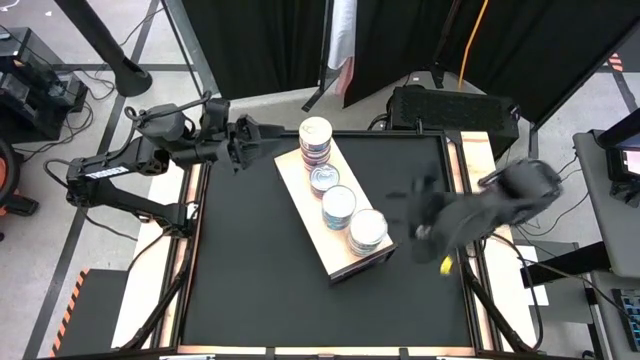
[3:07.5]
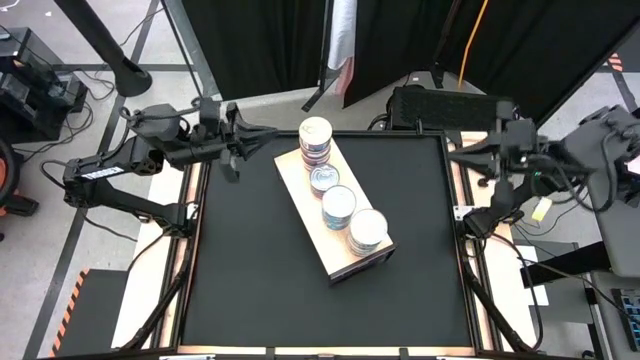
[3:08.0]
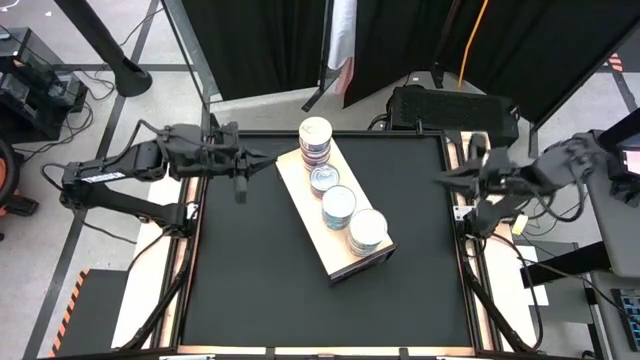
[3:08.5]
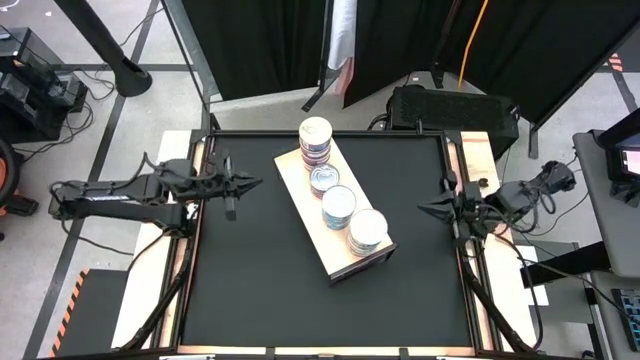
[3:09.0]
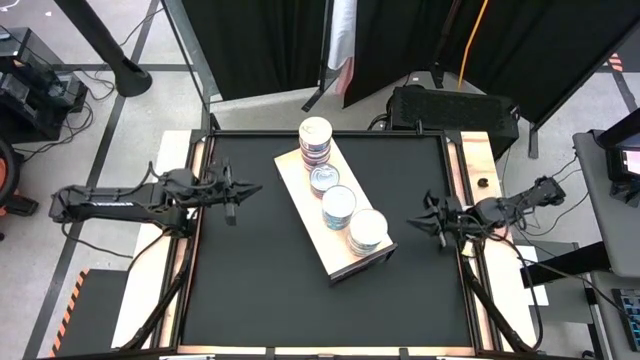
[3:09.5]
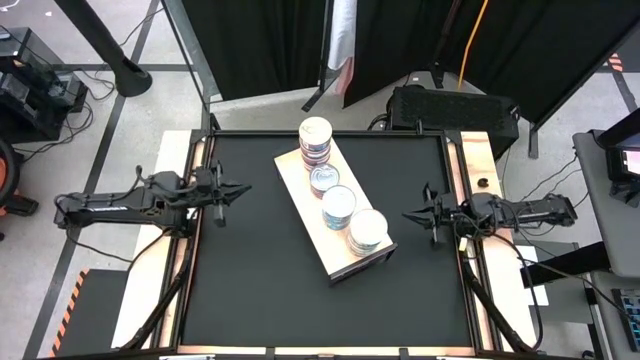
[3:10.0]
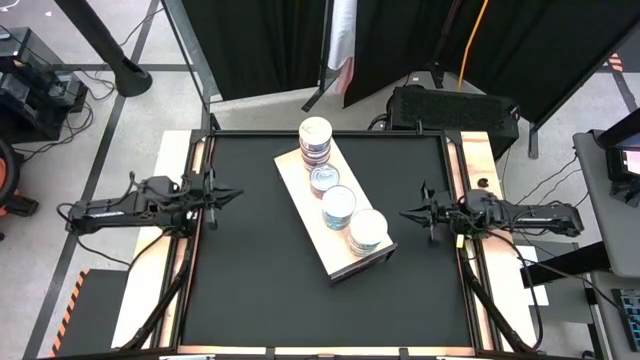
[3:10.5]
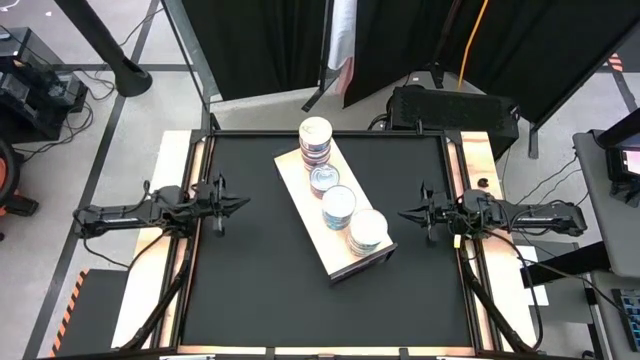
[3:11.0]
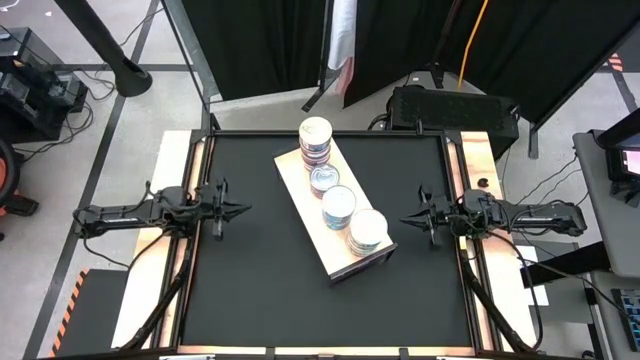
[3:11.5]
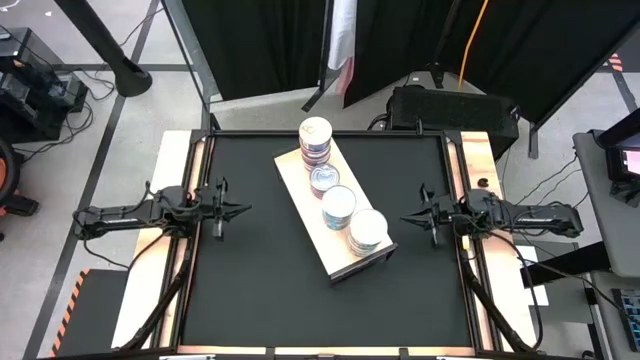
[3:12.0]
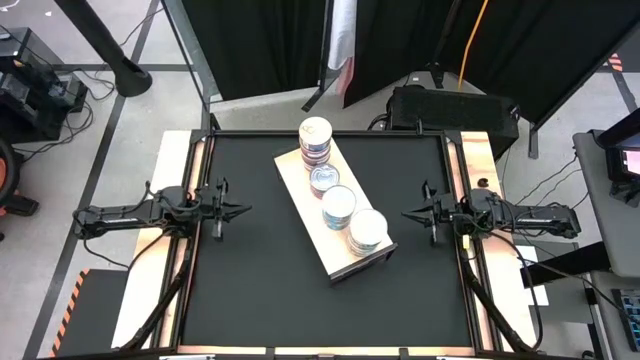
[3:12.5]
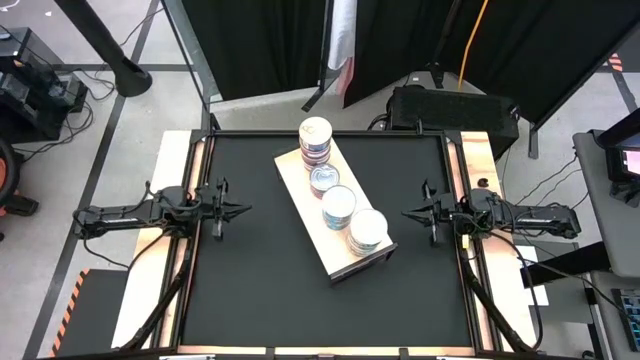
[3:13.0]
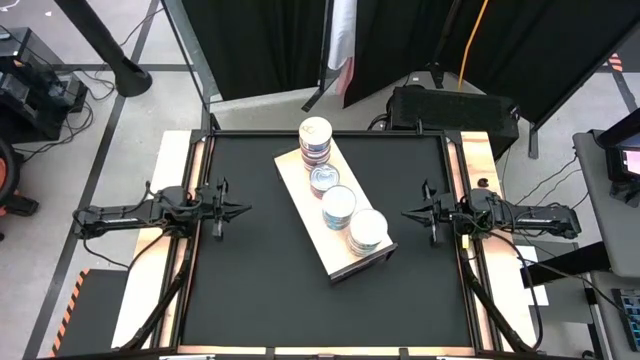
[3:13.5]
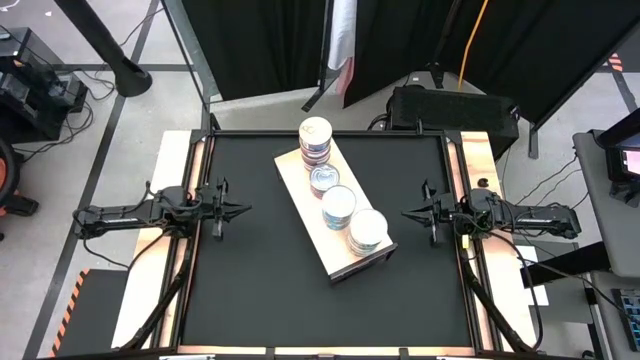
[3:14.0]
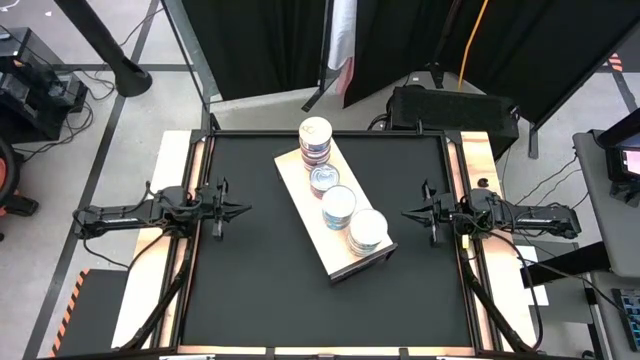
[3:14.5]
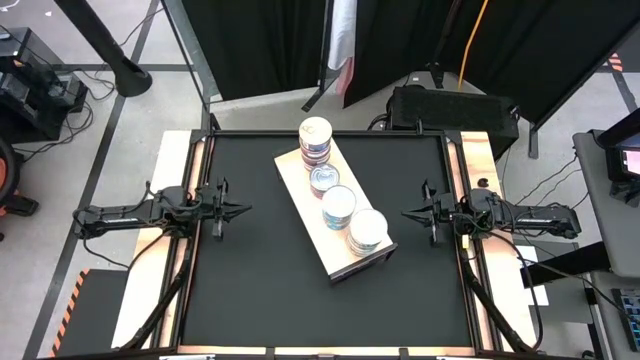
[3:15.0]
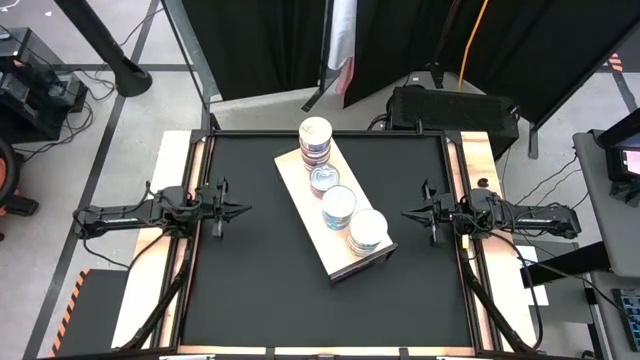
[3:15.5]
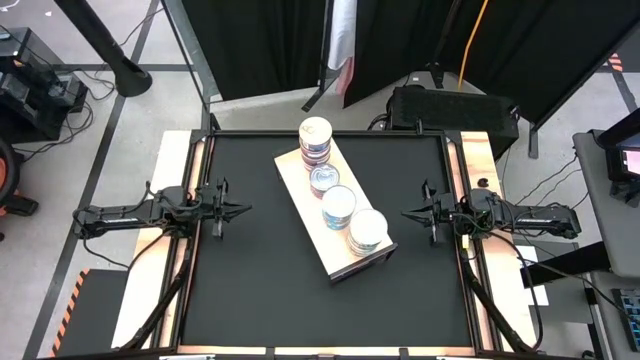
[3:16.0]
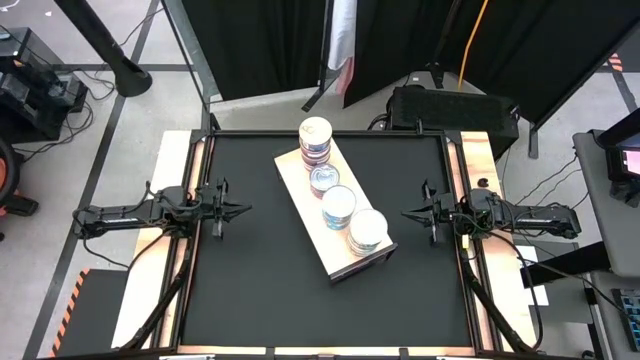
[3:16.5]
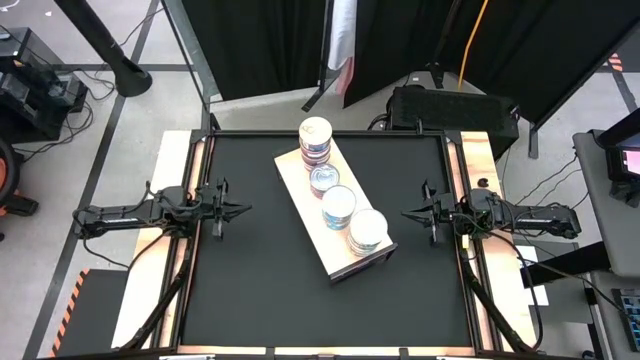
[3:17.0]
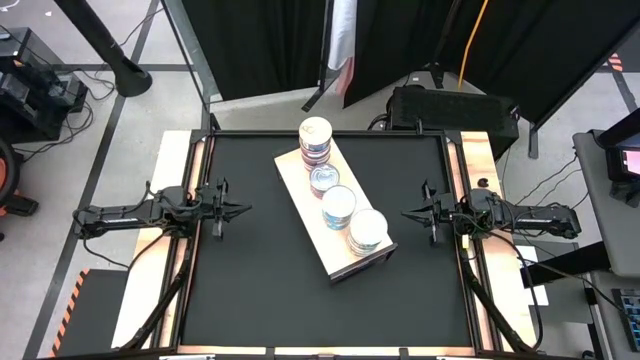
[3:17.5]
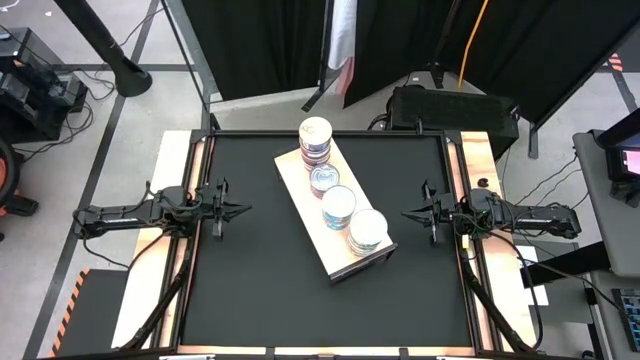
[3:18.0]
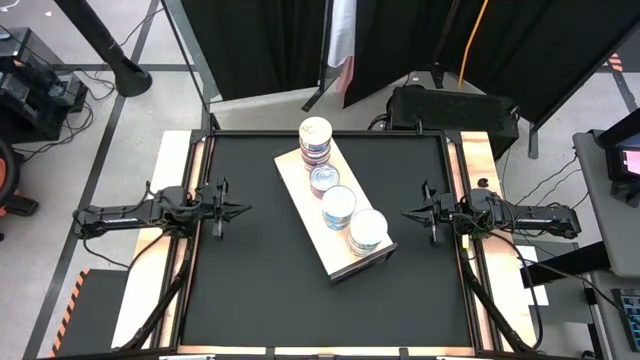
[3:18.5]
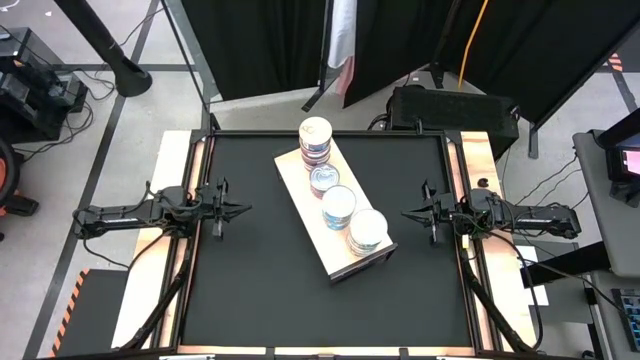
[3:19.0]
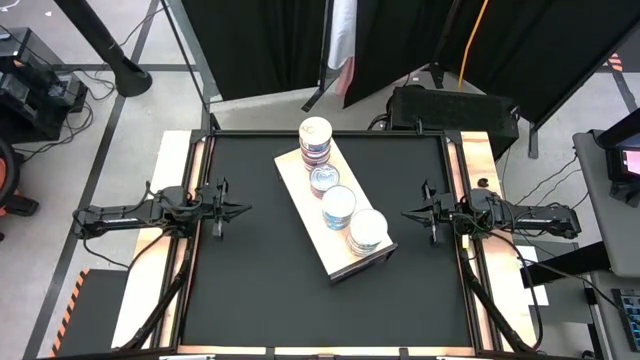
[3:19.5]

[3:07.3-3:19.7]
Task: Stack canned seafood by type on shelf
Return to Home Position

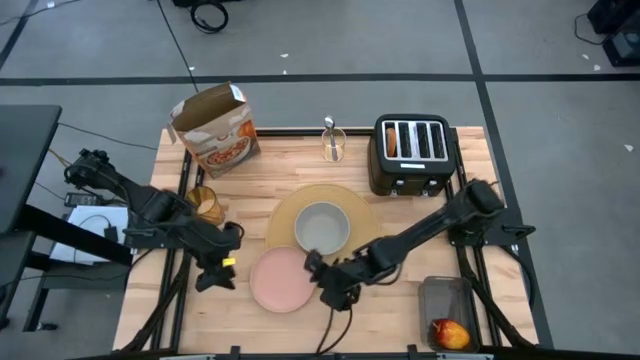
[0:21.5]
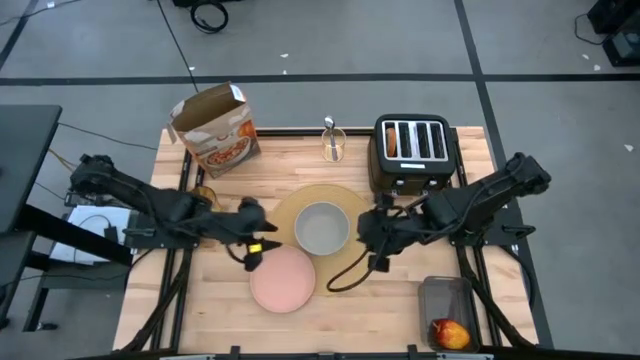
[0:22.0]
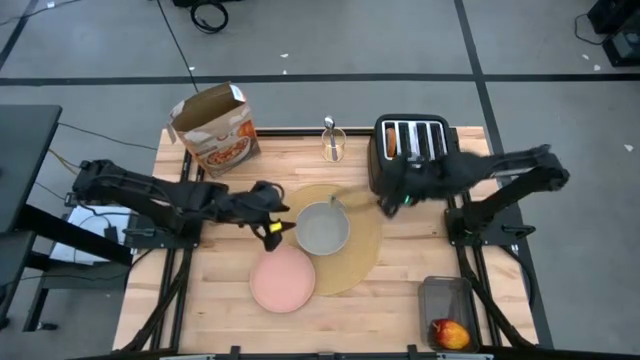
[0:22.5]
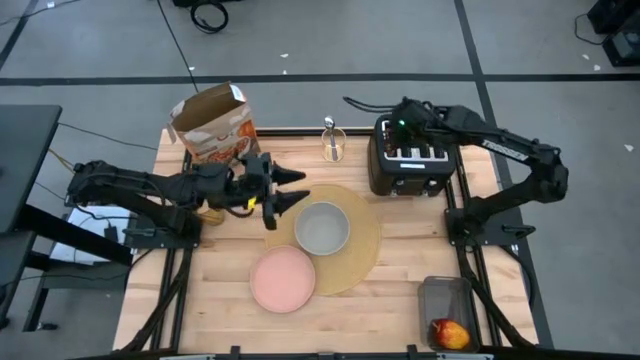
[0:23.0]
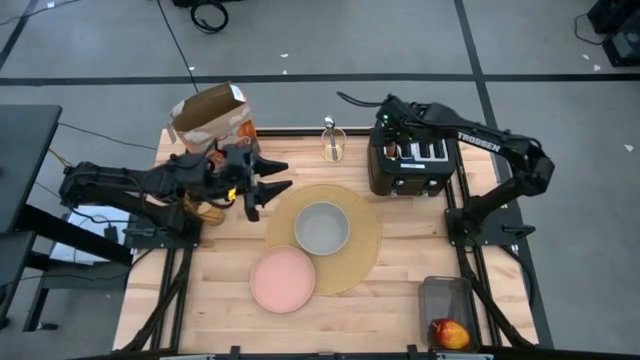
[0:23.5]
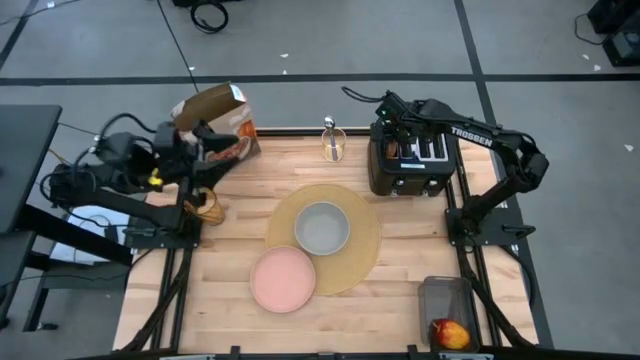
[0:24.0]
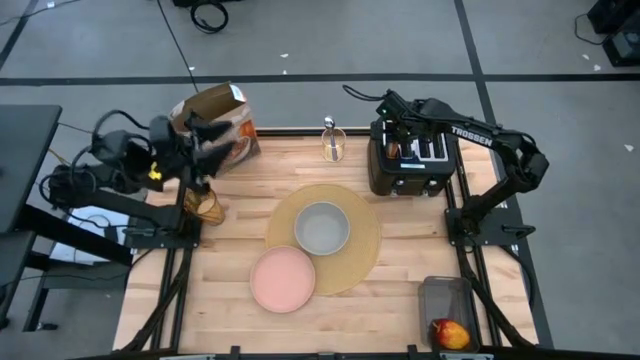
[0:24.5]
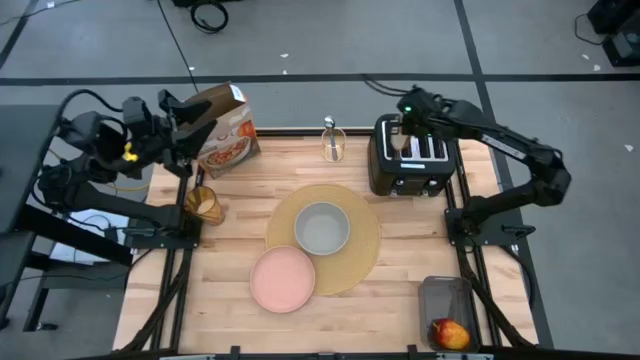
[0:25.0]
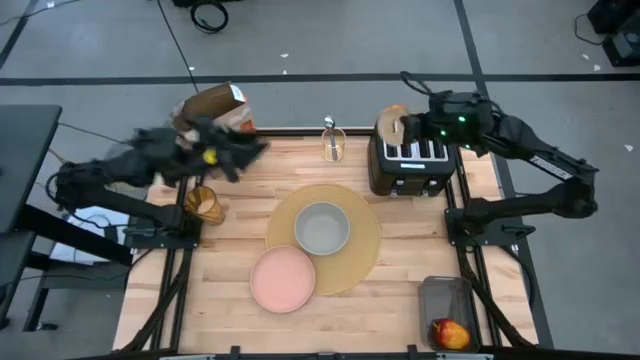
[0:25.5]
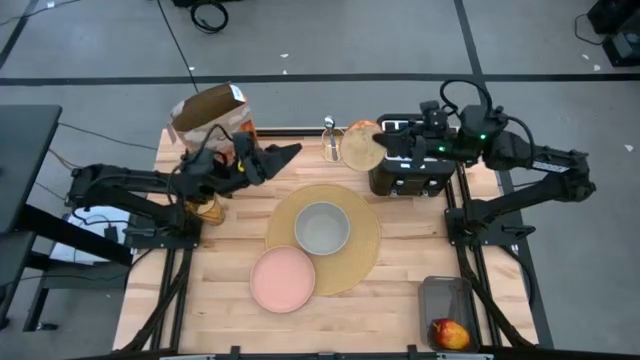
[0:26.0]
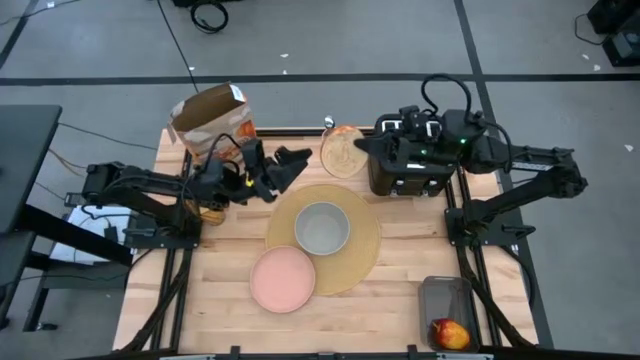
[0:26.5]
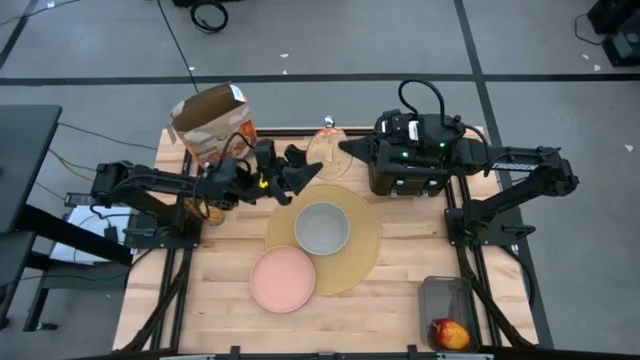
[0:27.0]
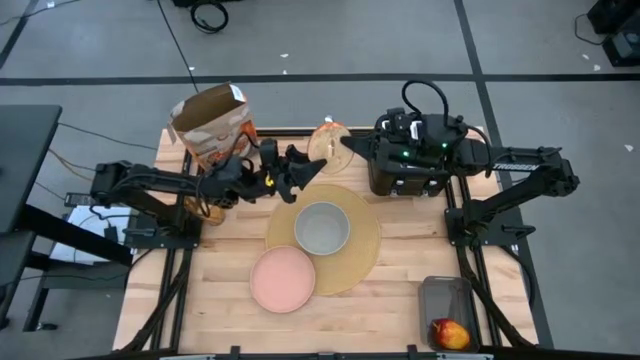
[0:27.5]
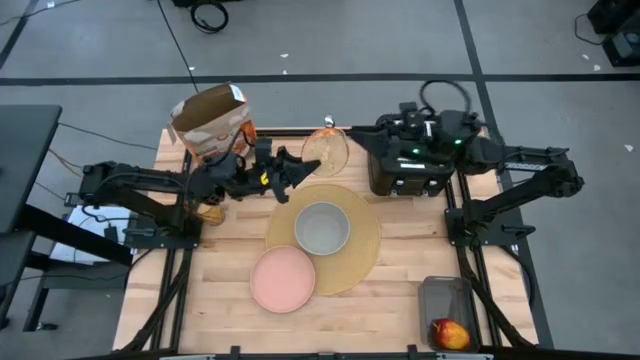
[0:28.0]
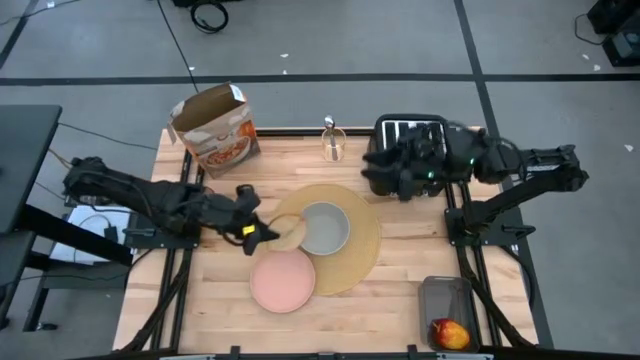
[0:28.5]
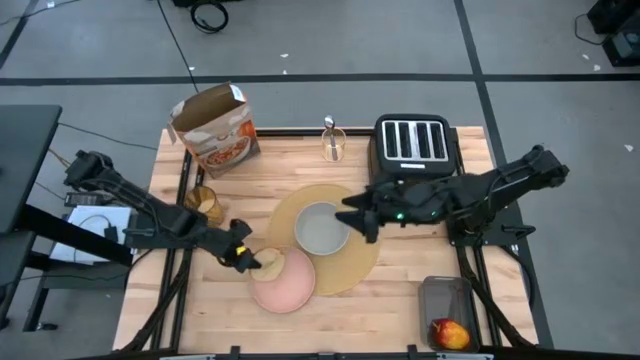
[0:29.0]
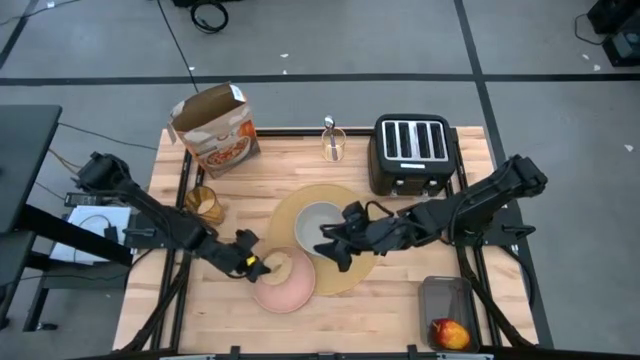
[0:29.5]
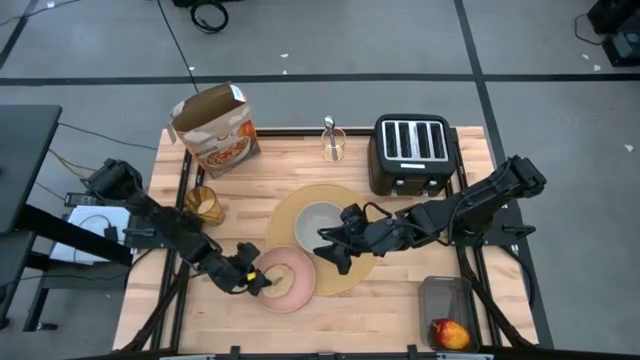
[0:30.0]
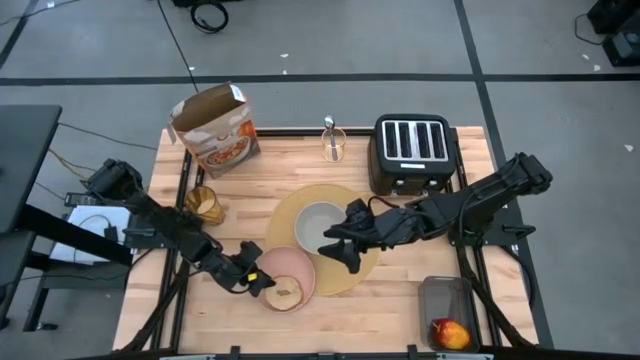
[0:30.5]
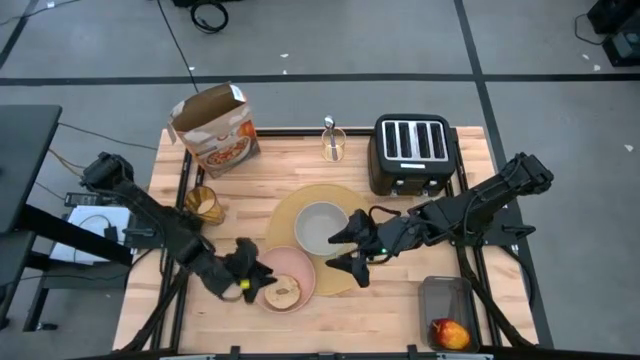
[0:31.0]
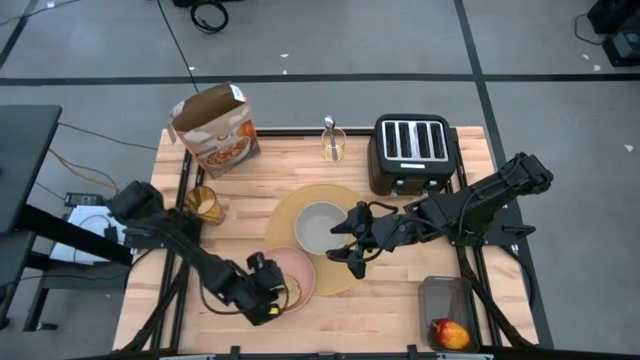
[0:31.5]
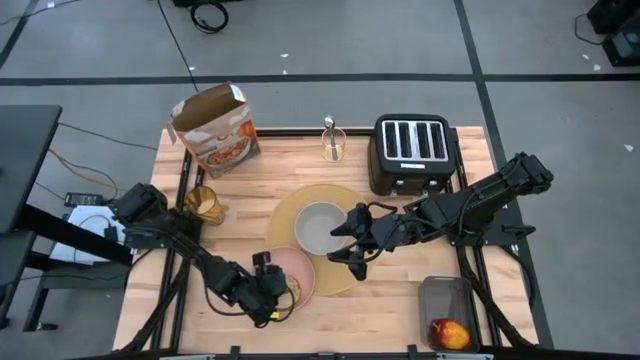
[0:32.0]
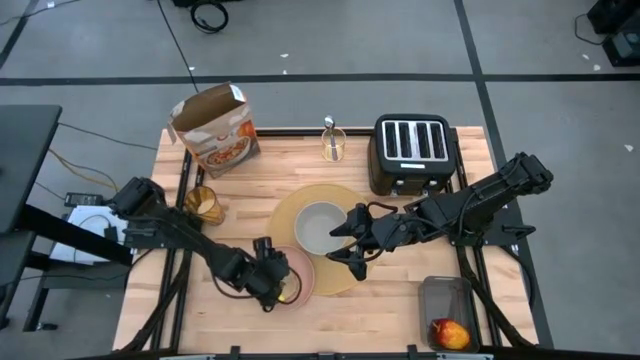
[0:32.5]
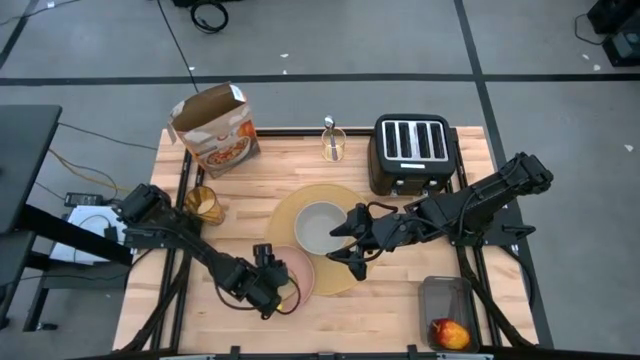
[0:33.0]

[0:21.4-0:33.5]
Task: Arrange a breakfast setting
Put the toasted bread on the pink plate
